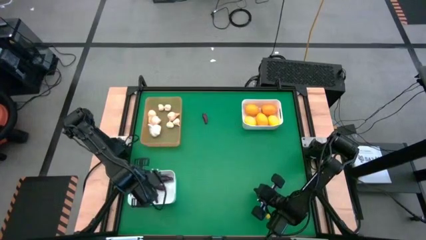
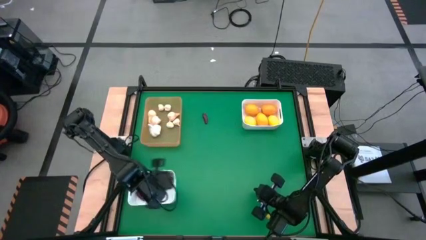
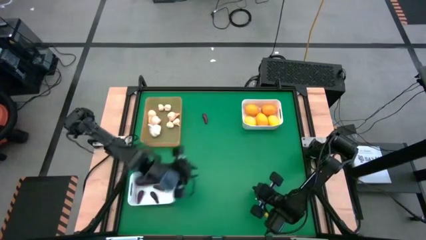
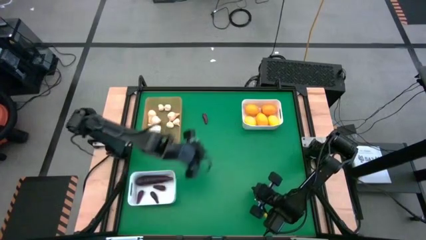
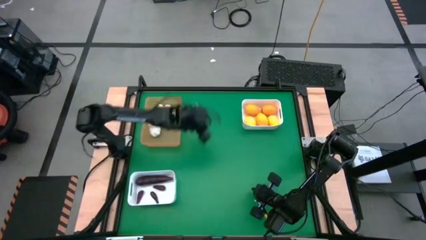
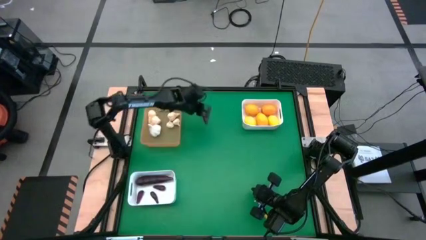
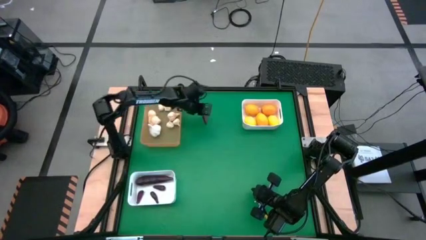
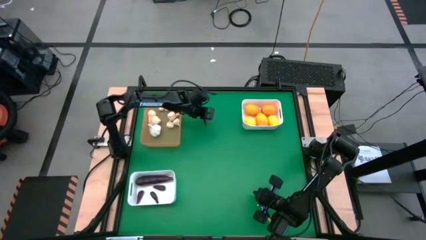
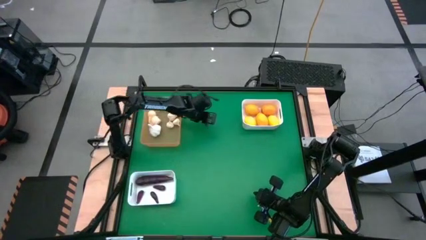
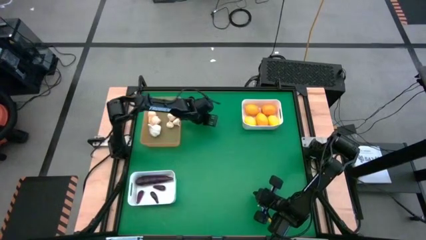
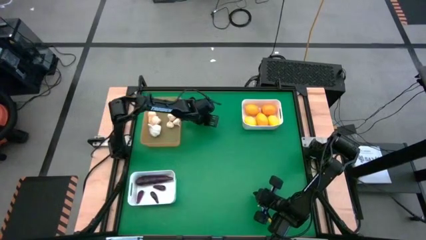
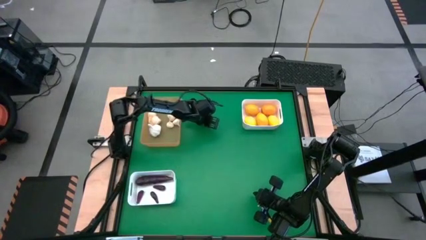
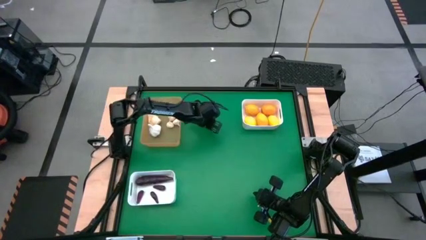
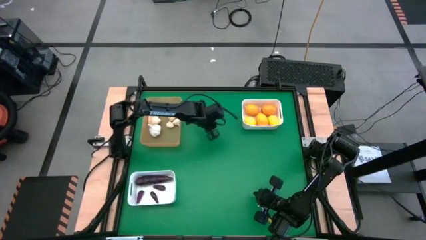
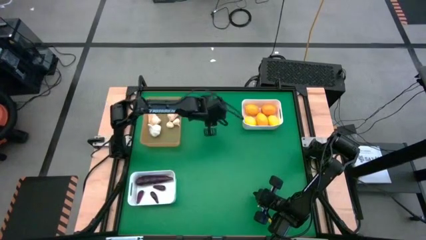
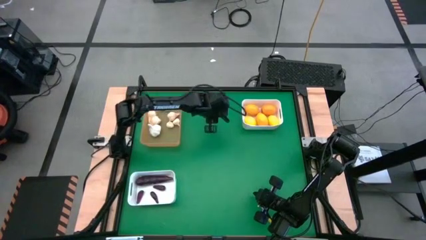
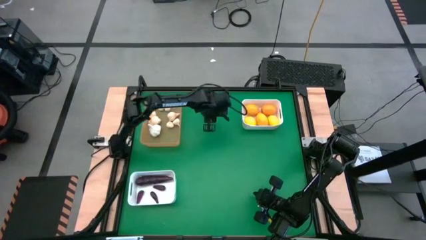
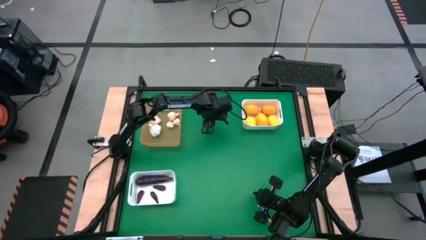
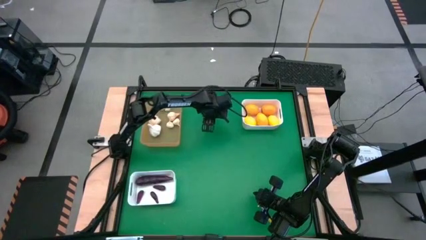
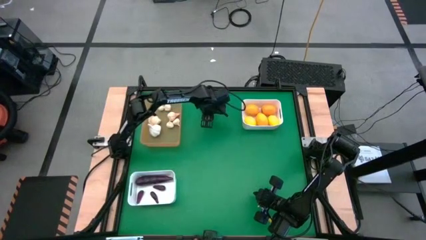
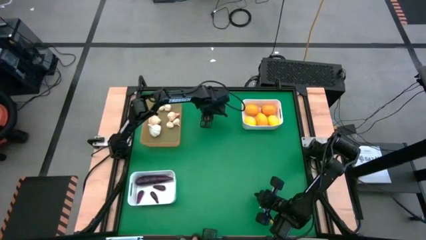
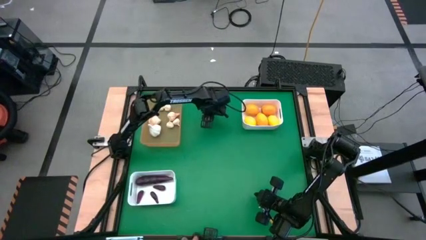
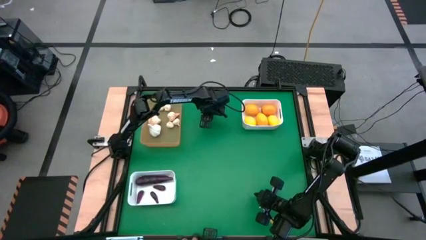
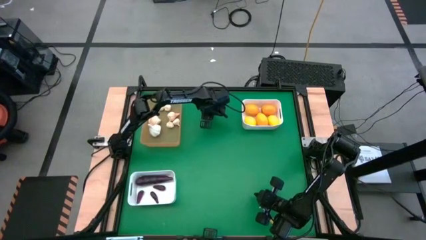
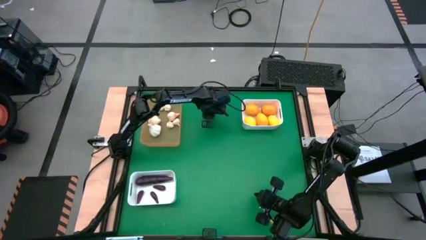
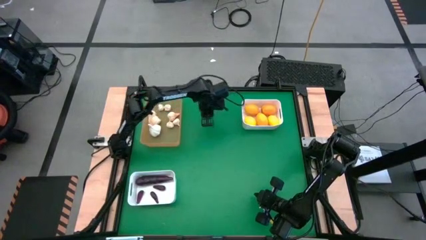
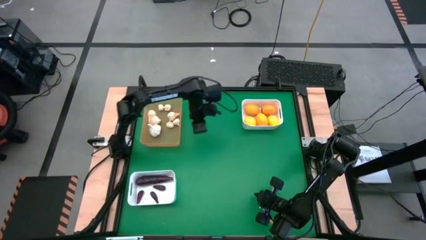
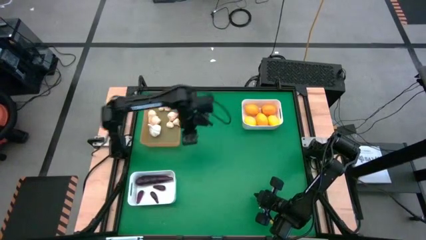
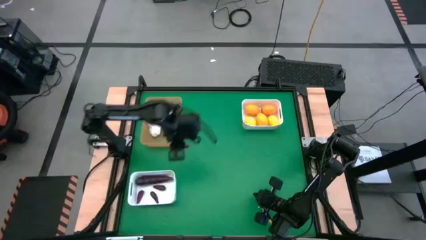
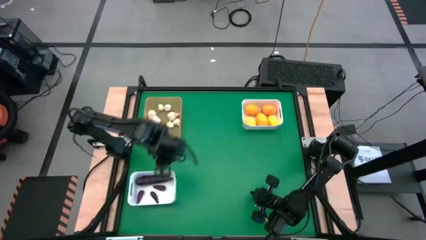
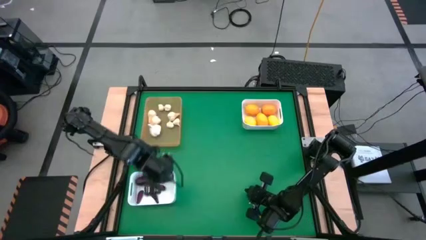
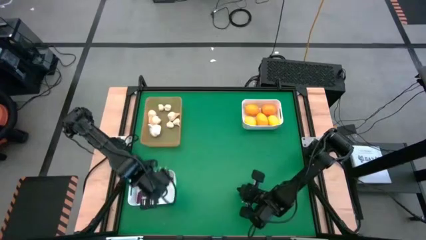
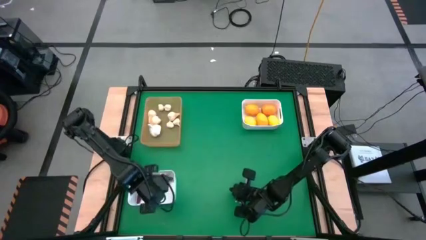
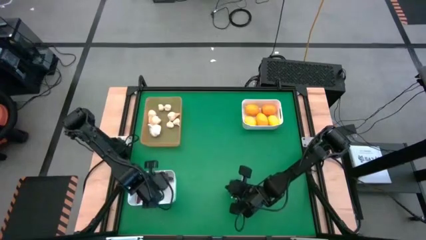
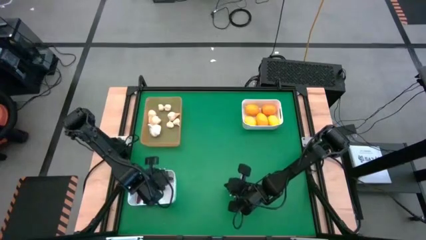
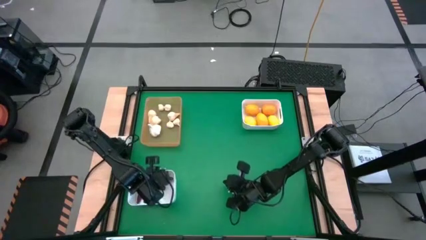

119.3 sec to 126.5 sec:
Task: Sort produce into baskets
Put the eggplant into the bottom white bin

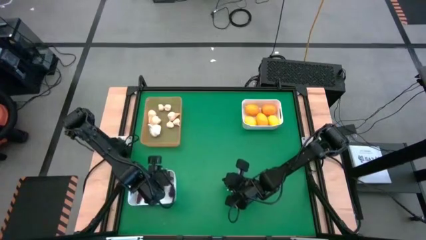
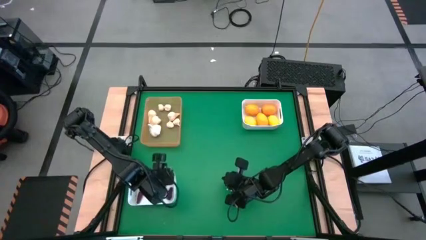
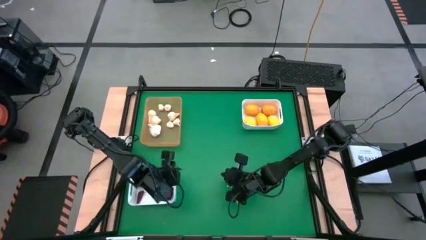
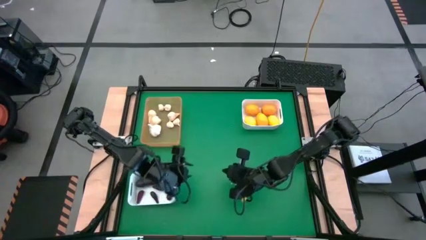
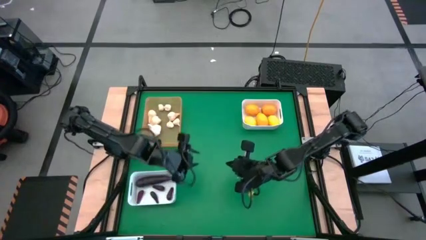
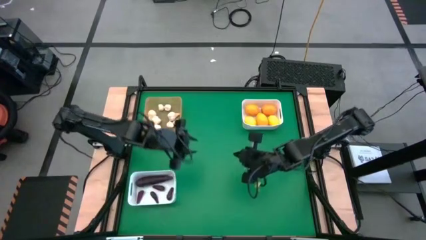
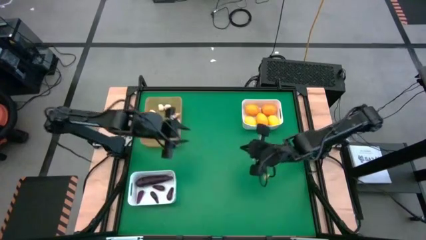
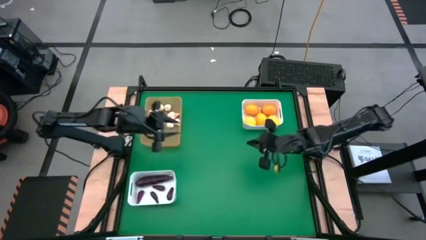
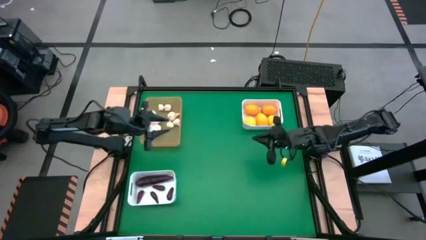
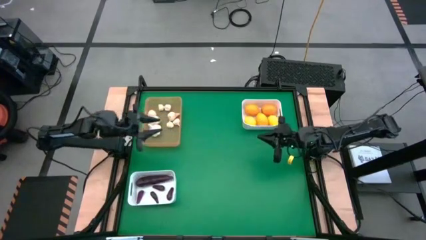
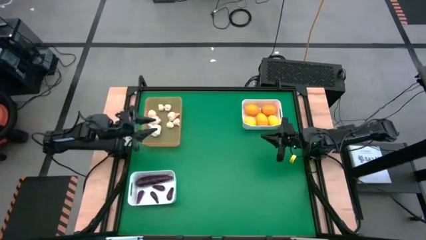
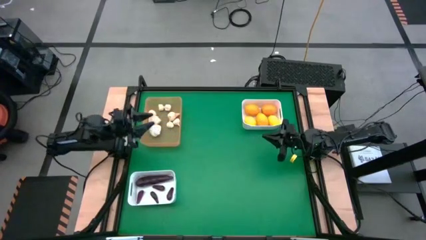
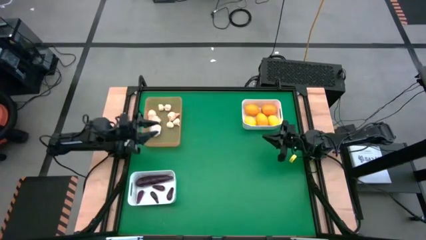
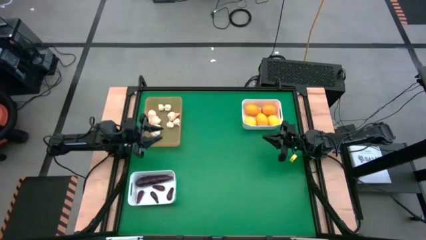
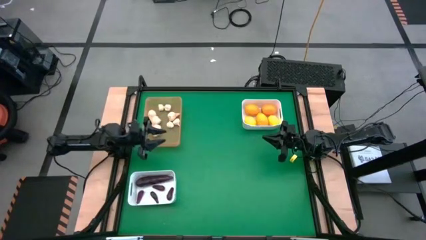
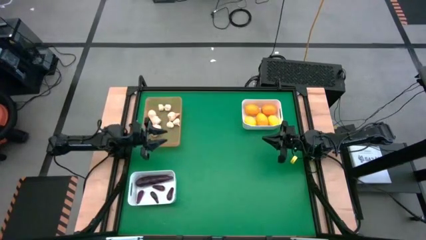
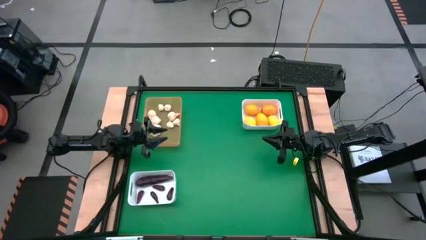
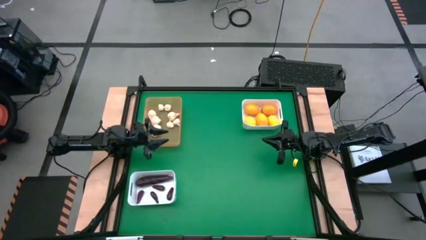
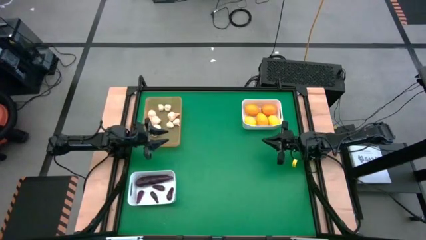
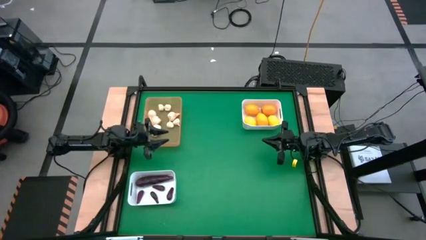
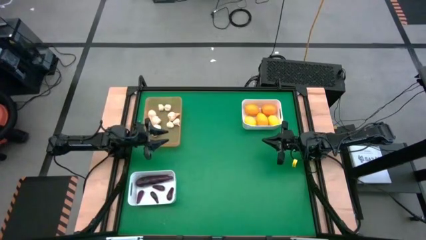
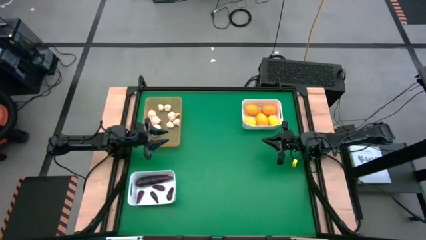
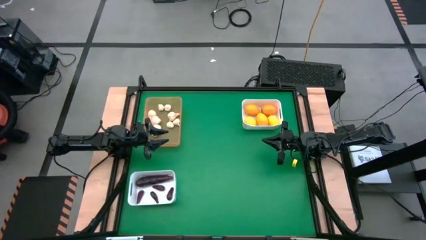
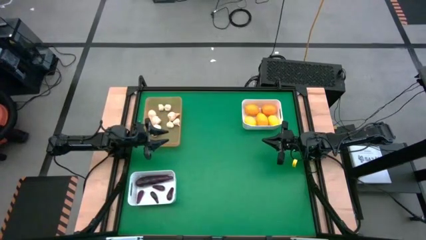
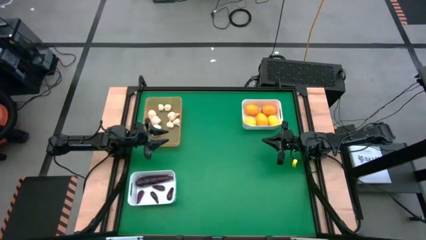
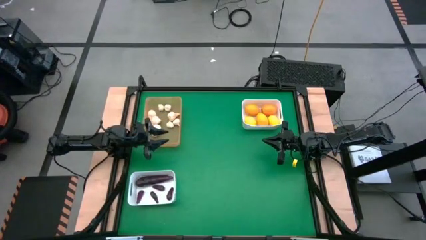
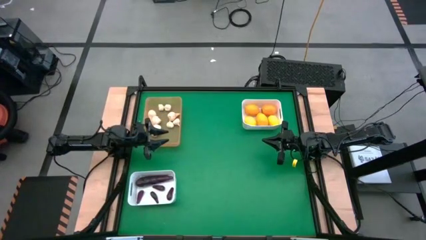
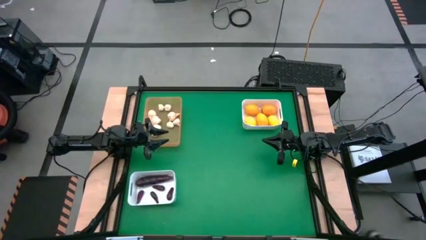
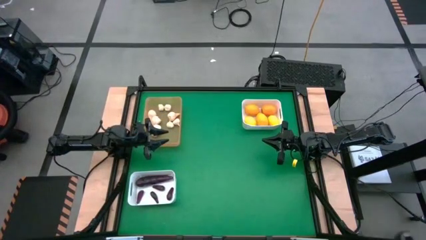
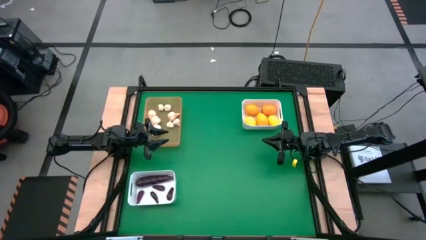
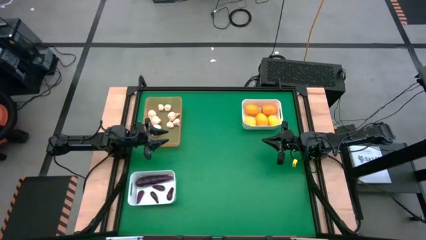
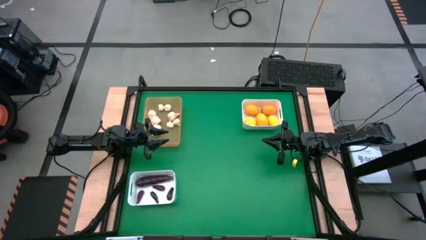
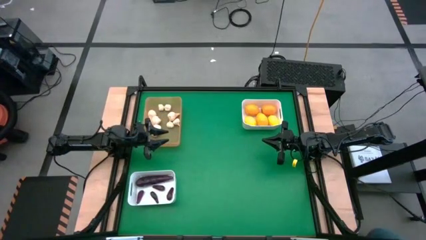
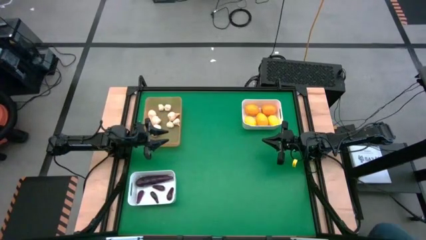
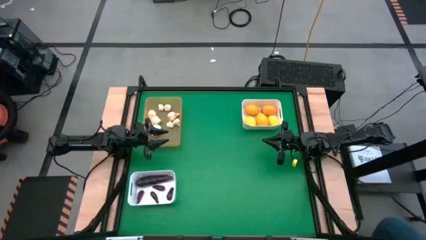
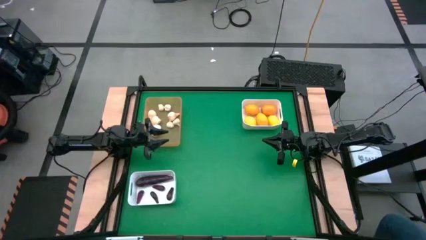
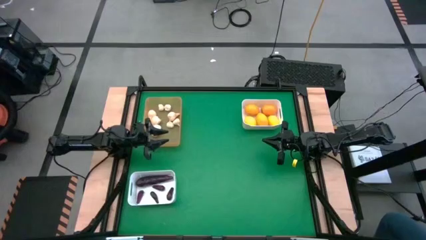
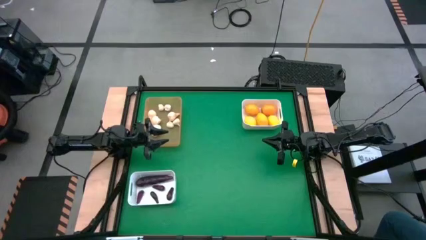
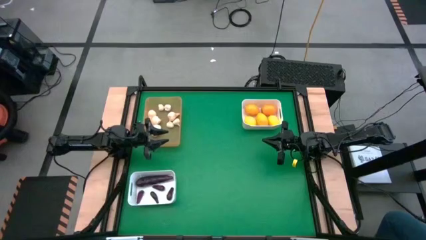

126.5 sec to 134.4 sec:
Return to Home Position

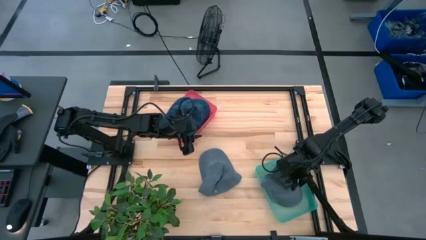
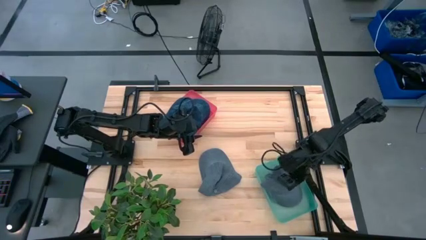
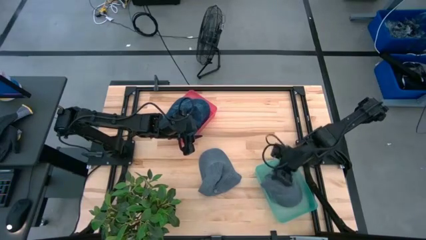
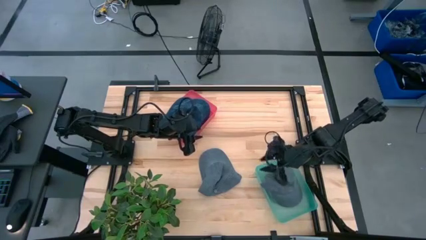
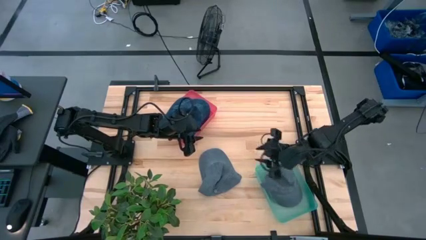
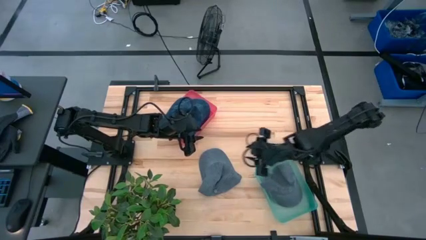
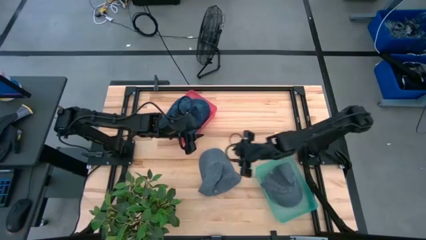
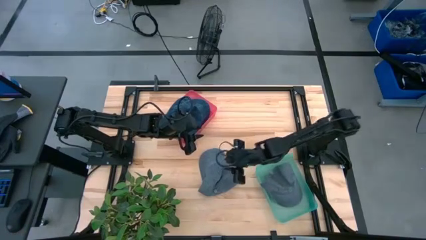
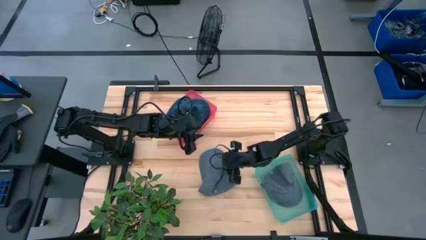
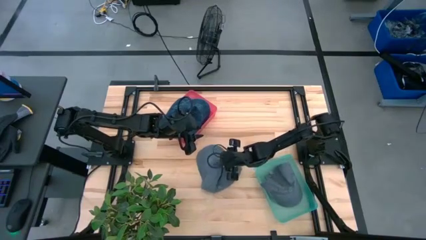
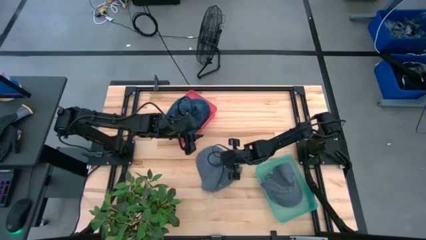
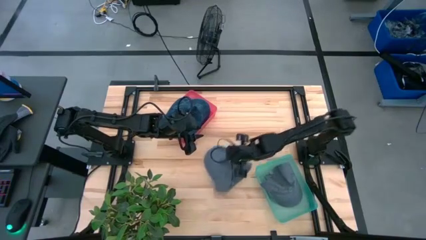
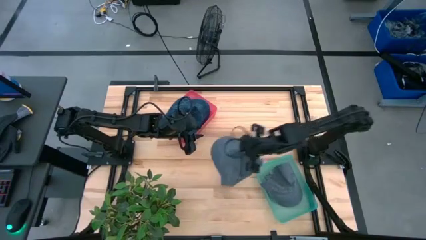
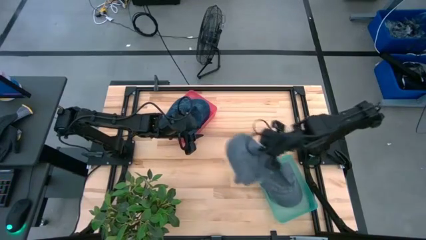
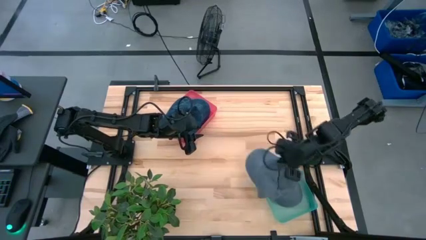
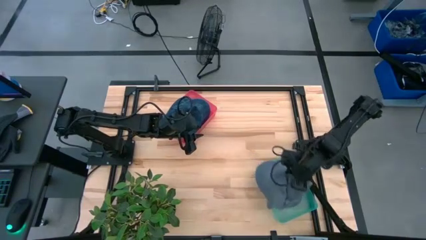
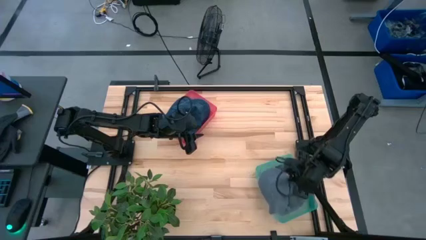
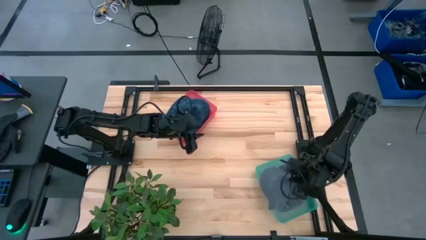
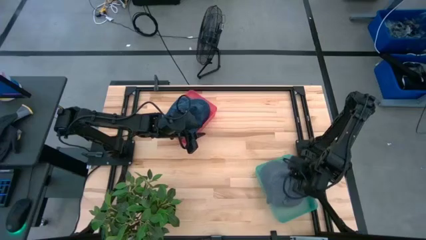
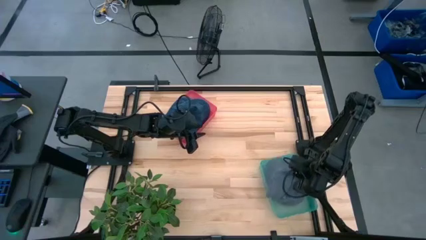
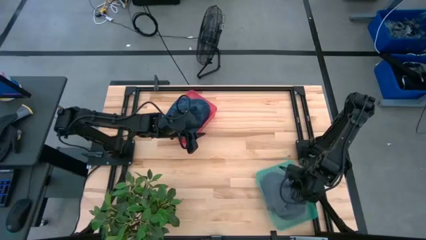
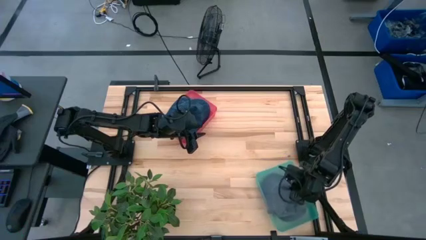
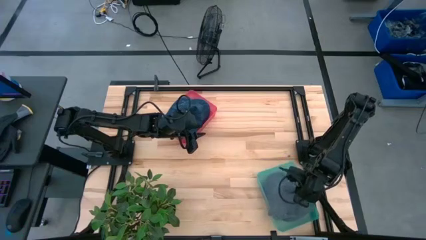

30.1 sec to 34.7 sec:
Task: Pick & Place hat
Put the gray cap into the green bin
